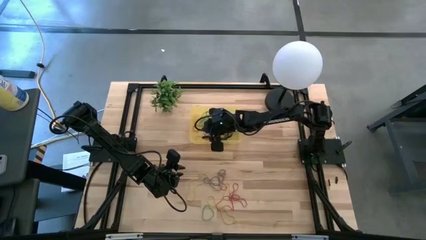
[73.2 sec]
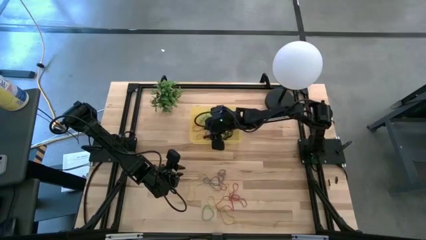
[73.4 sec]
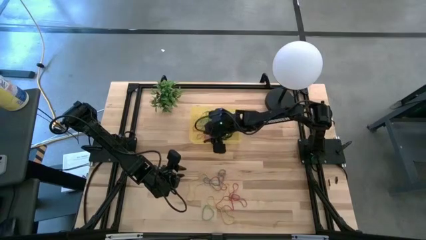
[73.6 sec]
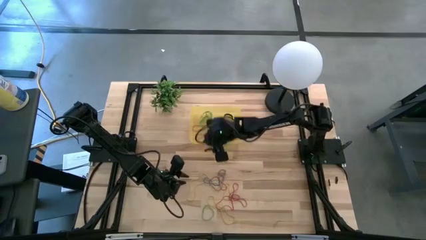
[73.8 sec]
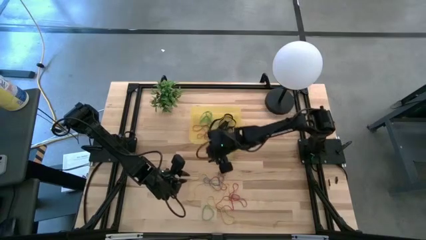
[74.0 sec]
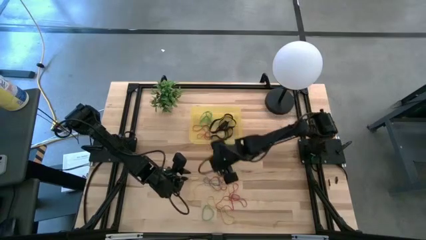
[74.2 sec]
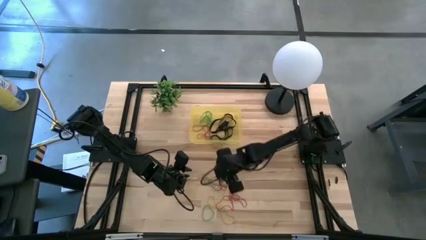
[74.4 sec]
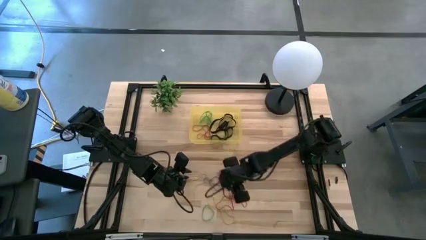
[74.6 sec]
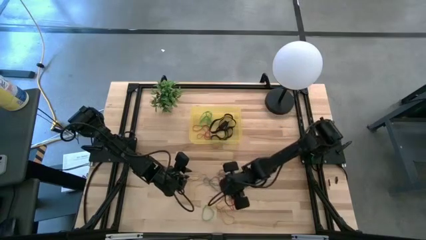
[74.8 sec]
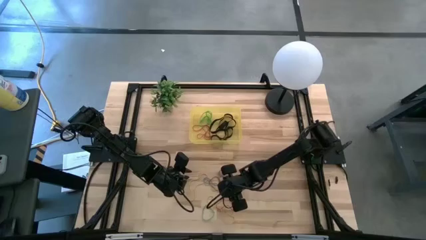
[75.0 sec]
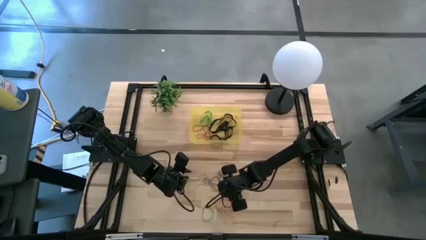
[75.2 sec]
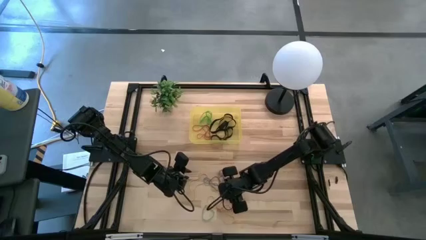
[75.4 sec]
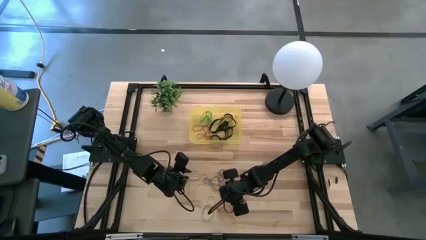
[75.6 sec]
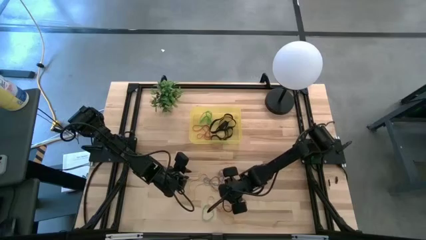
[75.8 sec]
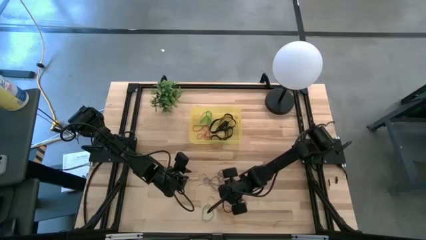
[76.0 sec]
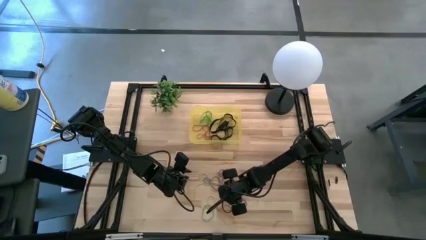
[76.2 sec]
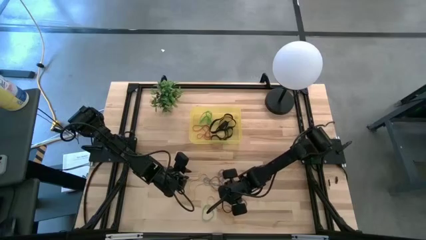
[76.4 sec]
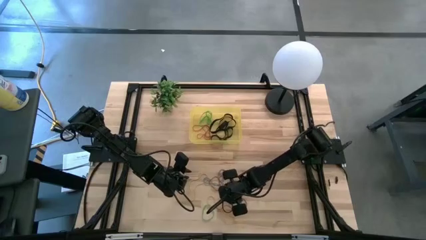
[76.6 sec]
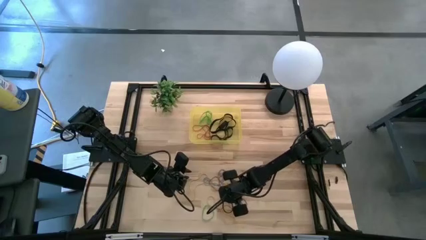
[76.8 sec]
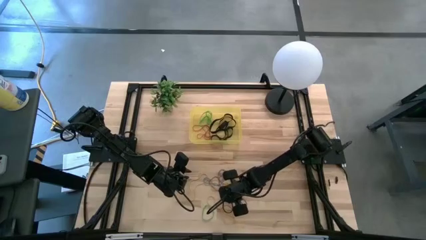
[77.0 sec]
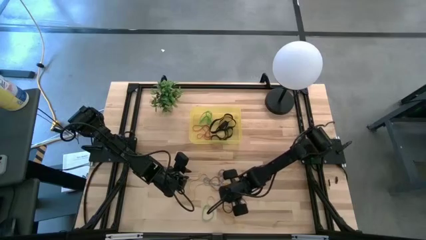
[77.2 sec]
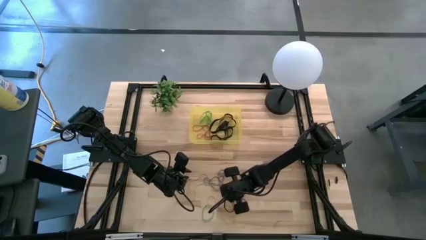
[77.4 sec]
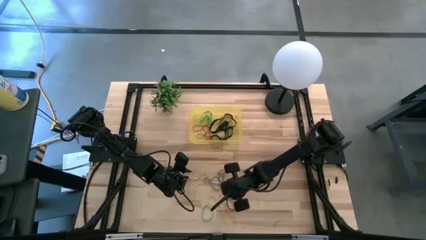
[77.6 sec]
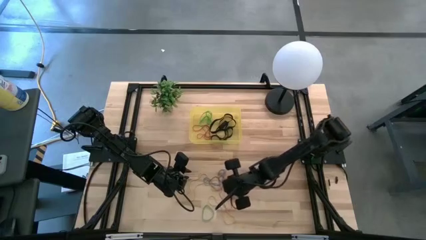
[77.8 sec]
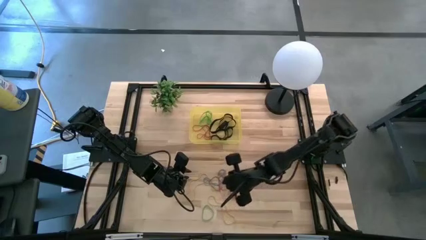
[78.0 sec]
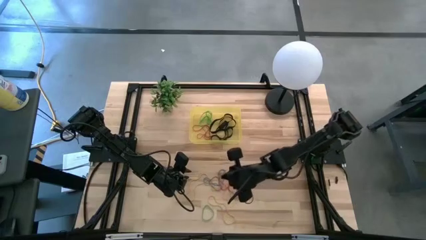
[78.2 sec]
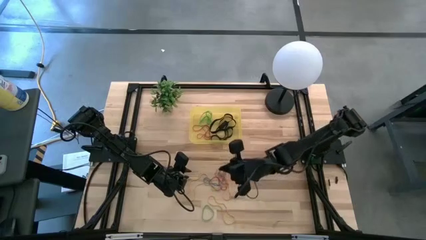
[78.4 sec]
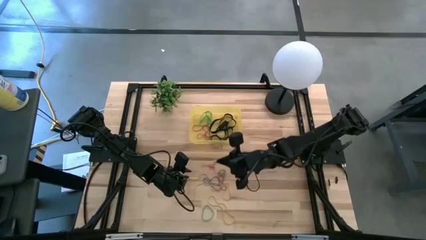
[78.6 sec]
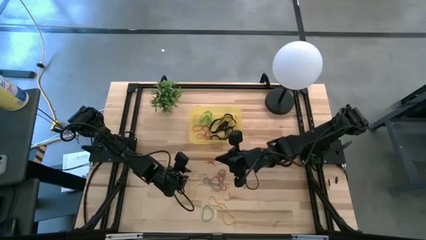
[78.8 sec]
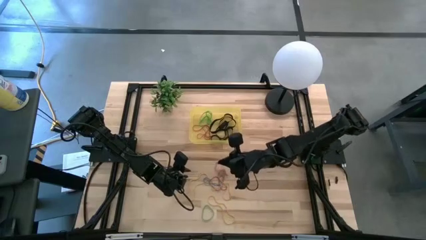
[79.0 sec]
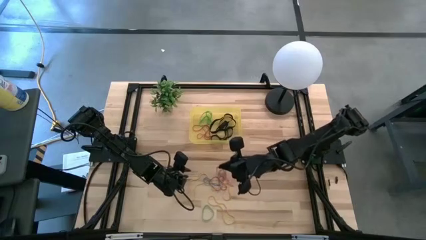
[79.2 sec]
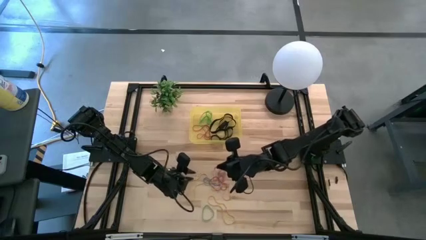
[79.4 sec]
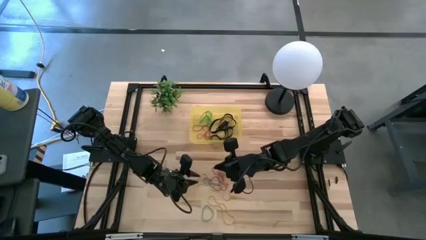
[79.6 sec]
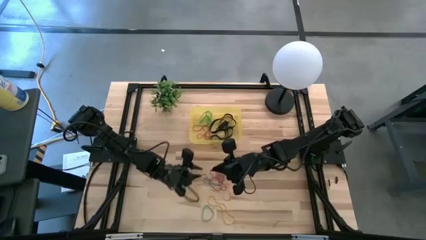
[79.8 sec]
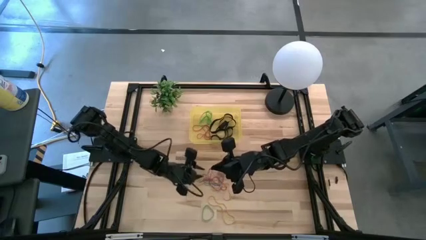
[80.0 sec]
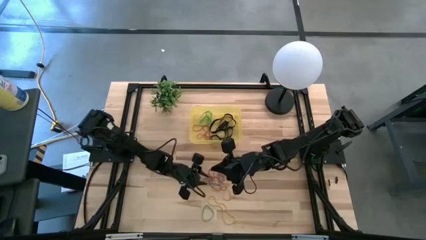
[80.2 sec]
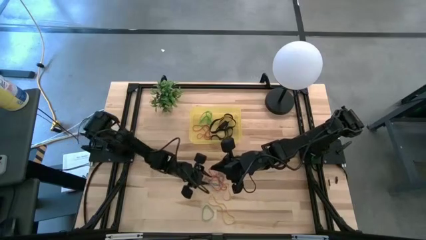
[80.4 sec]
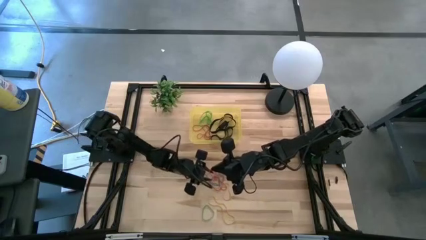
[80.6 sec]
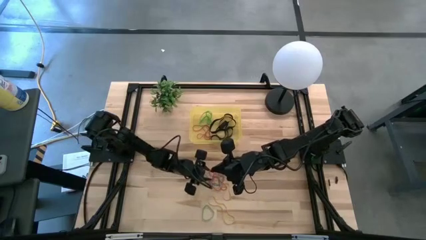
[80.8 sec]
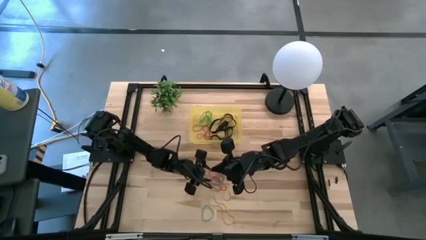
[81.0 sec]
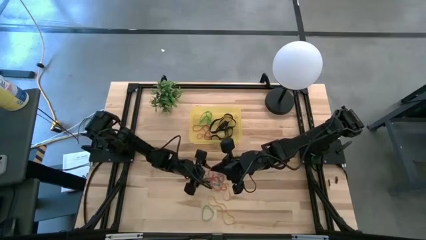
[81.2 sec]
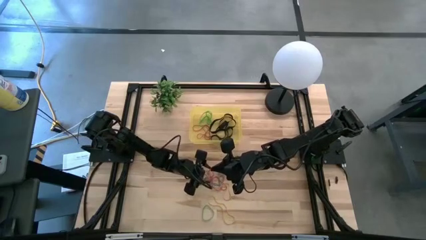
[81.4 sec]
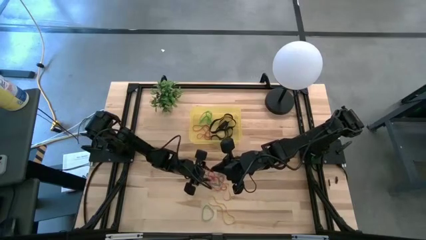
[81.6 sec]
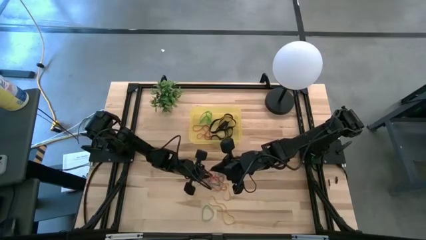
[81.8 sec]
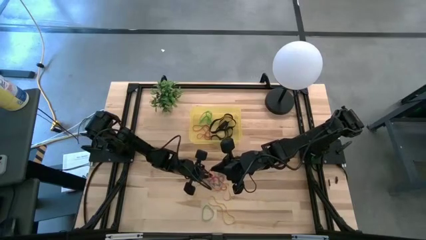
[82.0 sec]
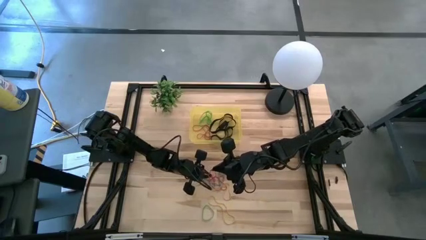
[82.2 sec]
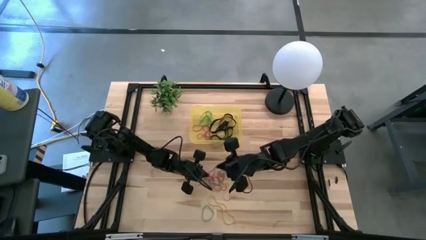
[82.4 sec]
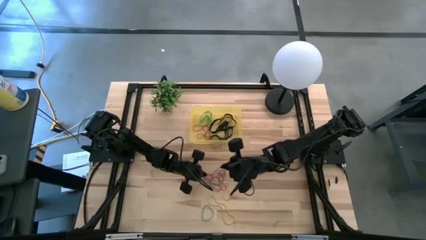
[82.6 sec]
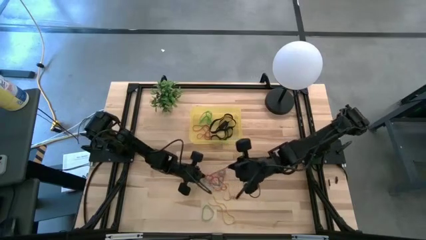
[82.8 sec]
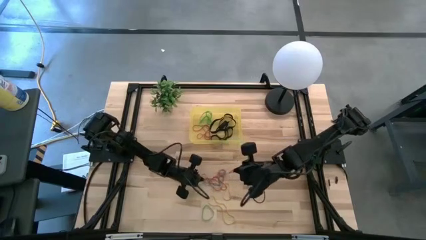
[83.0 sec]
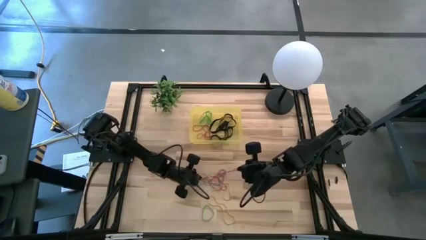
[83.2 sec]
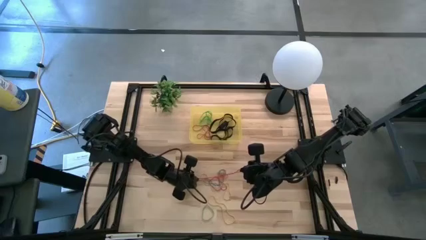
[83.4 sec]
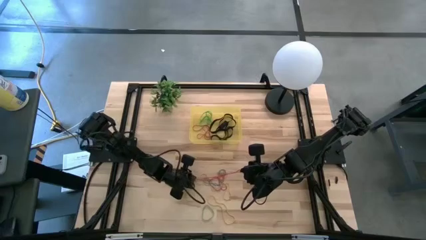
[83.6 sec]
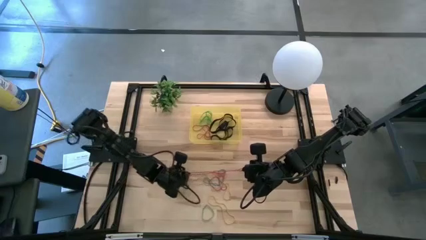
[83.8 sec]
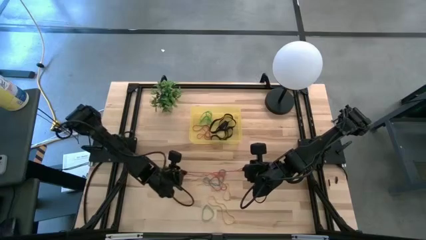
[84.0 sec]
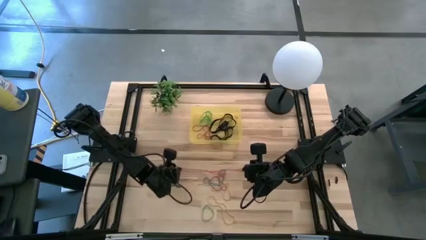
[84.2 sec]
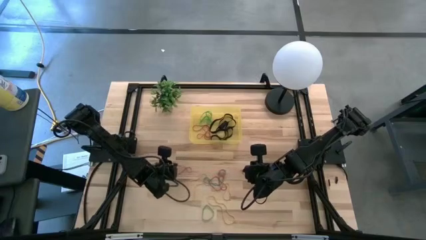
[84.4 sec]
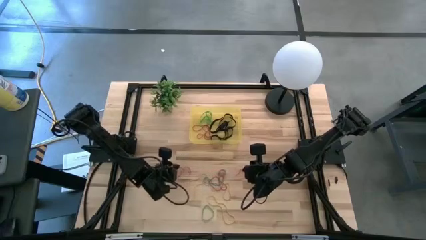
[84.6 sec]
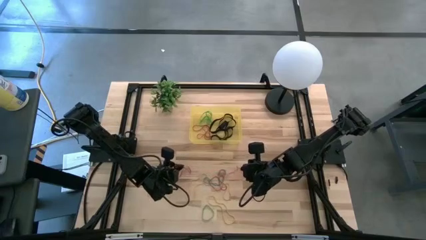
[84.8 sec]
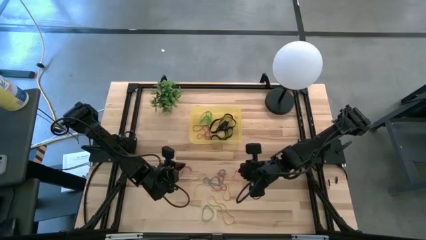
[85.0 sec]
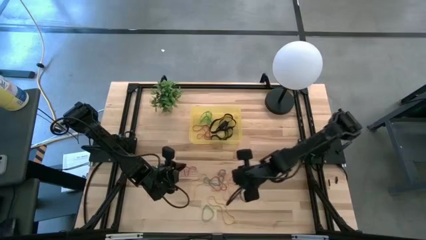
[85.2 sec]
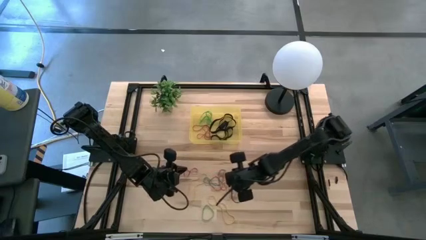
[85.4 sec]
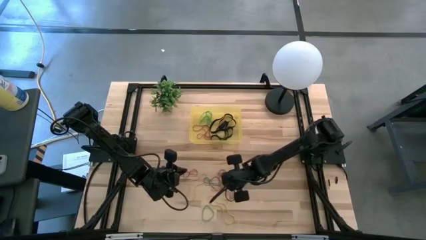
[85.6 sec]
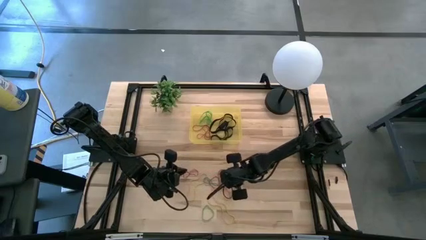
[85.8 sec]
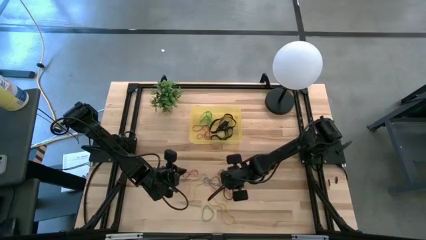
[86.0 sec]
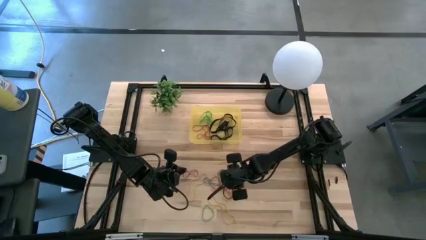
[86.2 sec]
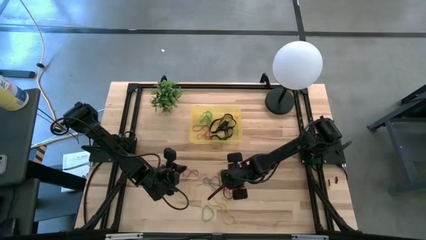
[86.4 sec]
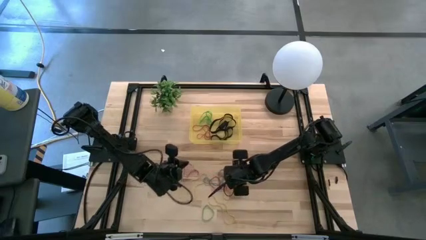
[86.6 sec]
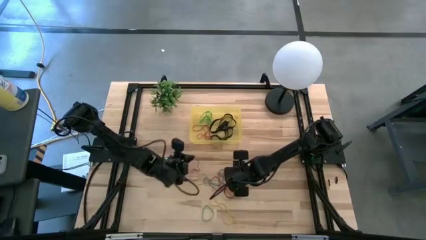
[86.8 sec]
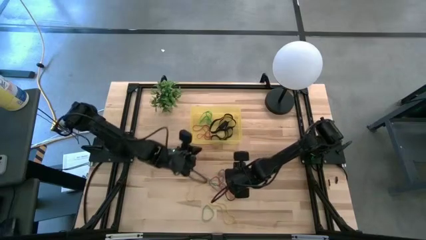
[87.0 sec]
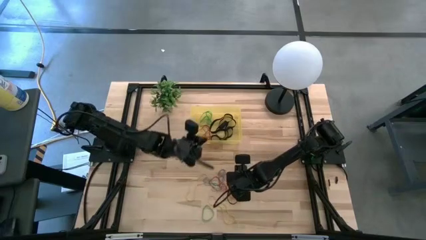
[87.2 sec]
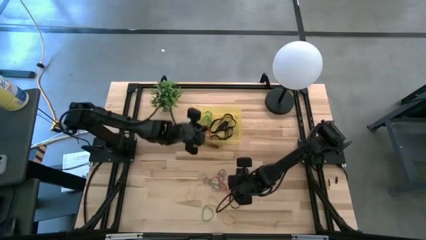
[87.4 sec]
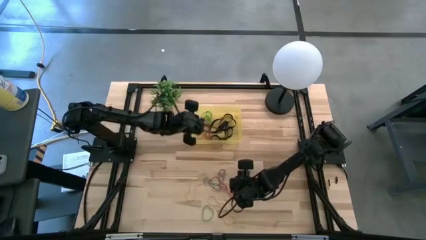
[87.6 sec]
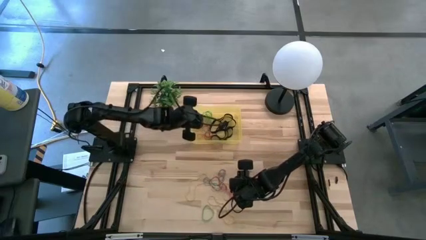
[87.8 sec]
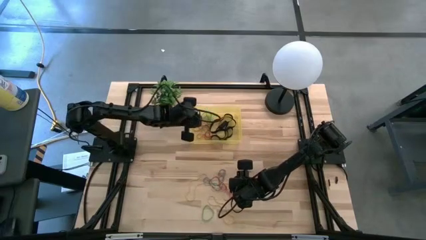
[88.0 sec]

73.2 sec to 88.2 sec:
Task: Pick and place rubber bands into bin
Put the red rubber band into the yellow bin

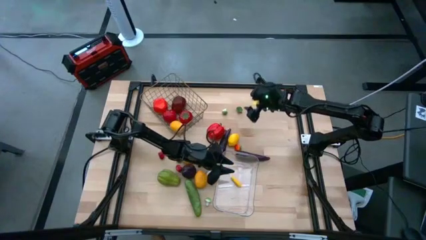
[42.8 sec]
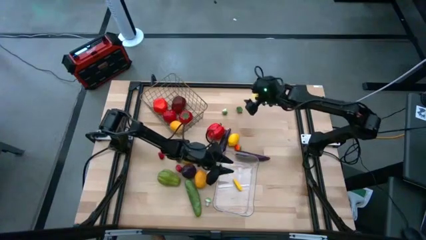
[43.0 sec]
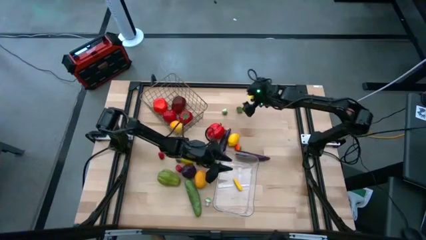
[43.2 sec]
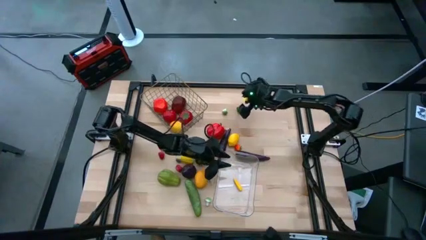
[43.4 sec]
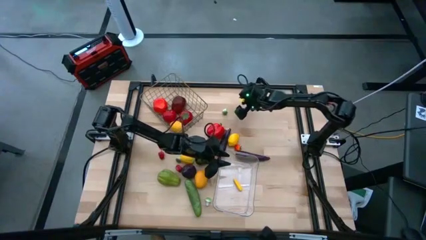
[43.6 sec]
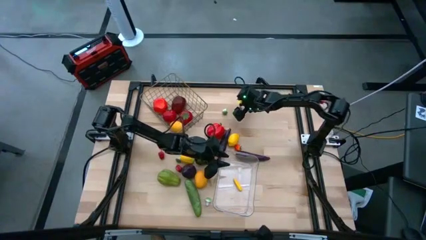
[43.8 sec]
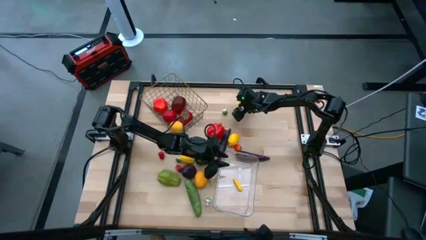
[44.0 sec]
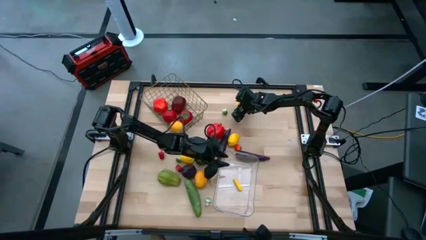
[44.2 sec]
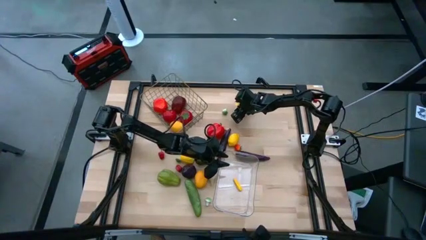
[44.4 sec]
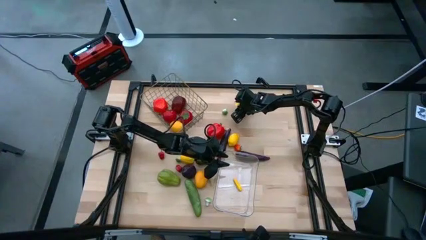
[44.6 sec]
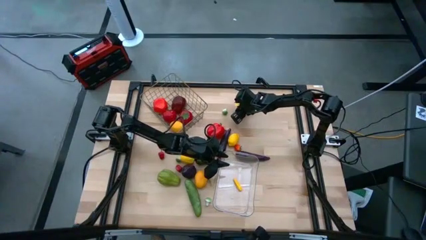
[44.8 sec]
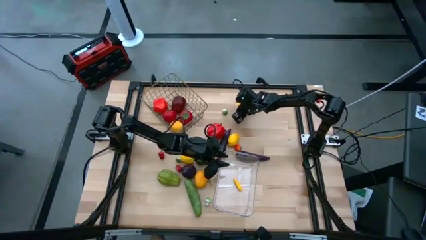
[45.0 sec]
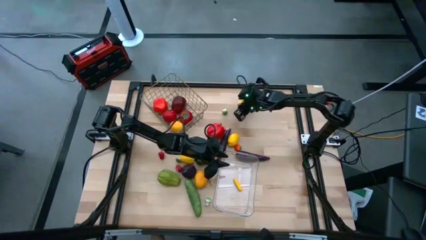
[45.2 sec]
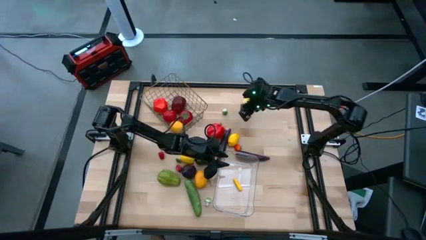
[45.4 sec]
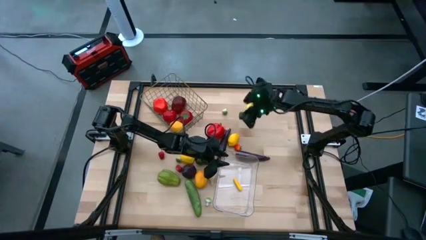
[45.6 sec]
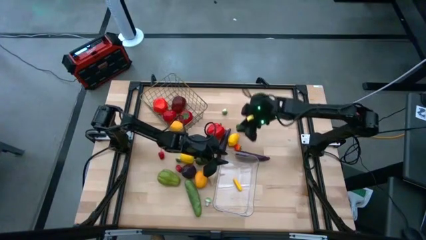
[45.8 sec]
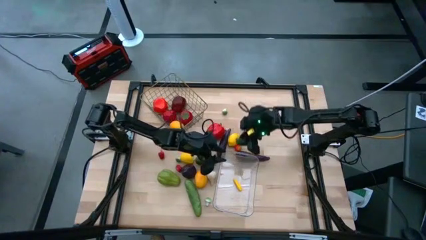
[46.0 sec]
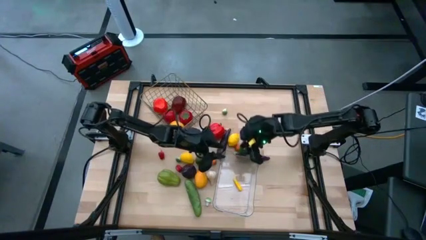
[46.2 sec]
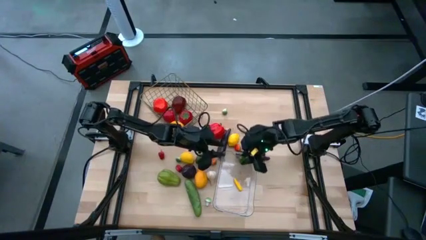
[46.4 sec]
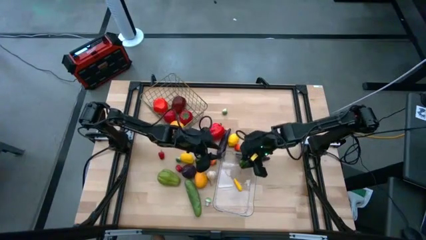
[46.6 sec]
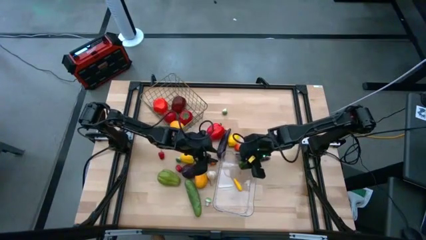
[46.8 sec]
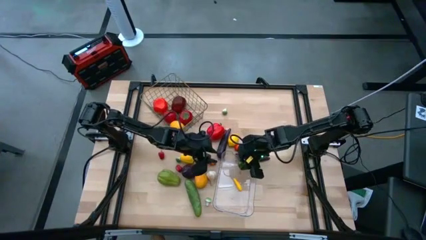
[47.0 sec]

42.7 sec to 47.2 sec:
Task: Sort produce into baskets
Put the green chili pepper into the transparent bin
